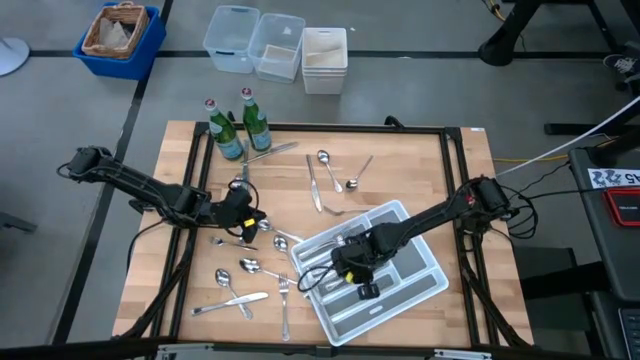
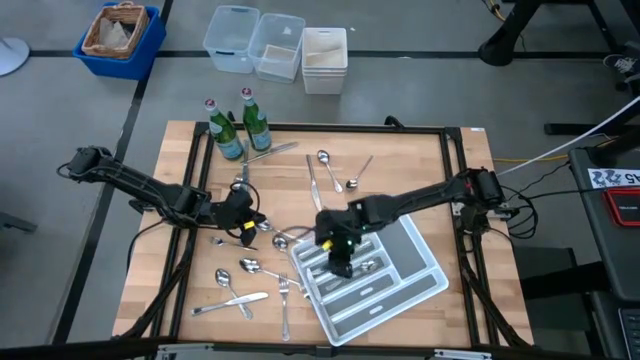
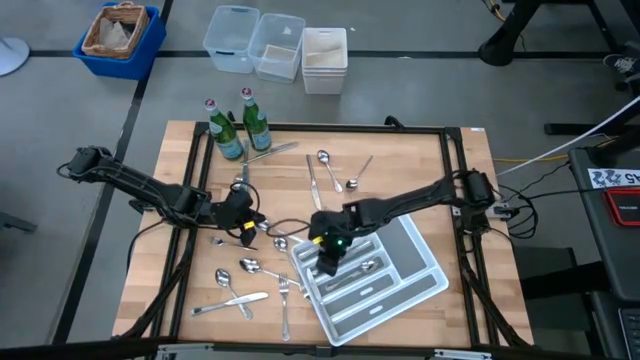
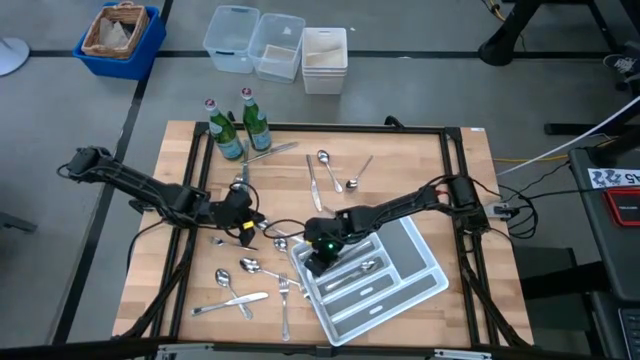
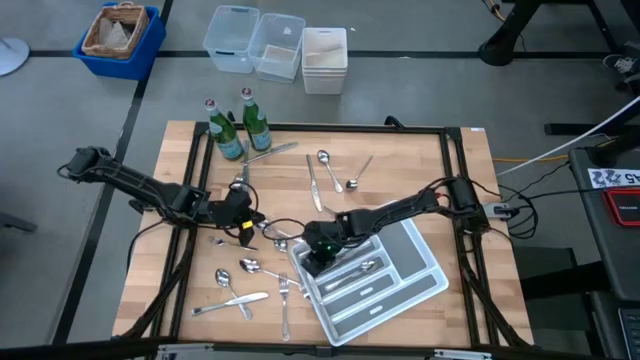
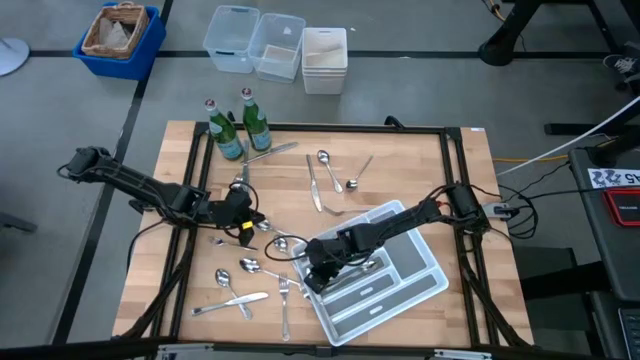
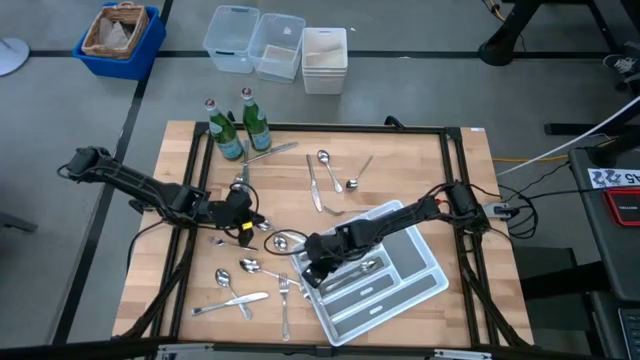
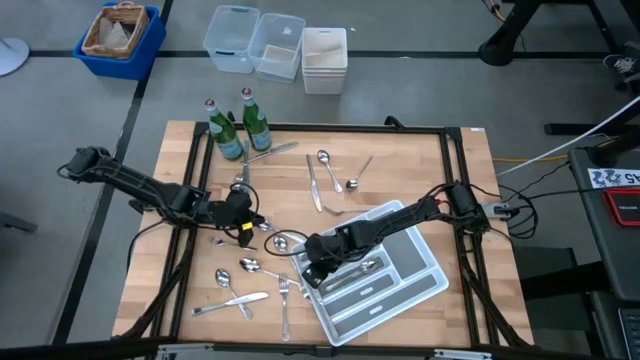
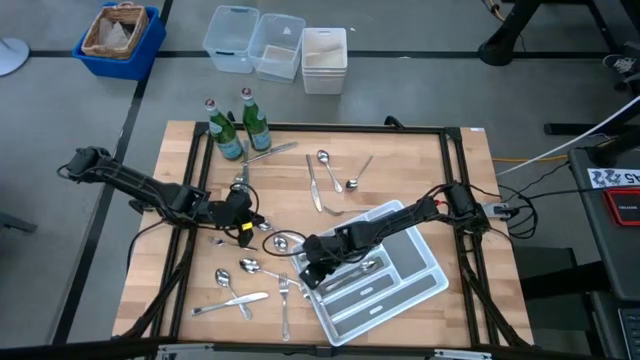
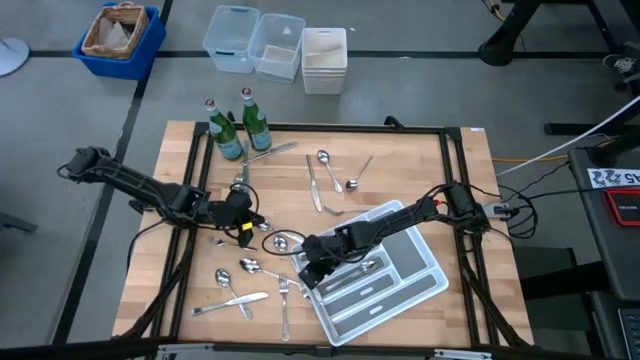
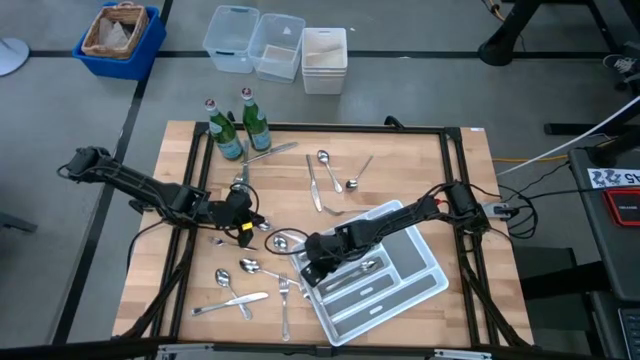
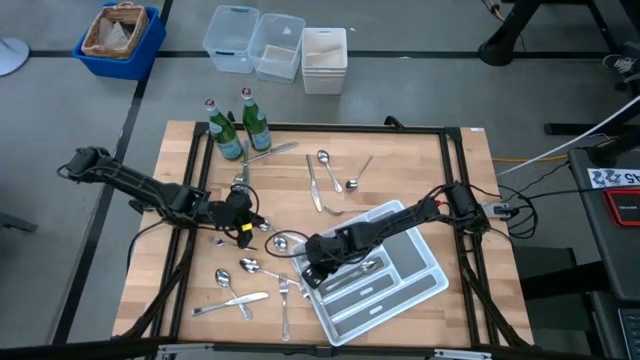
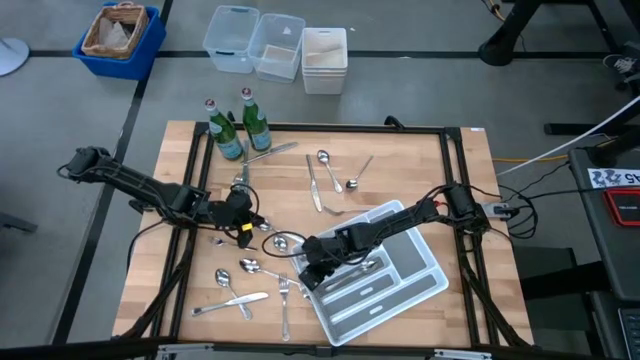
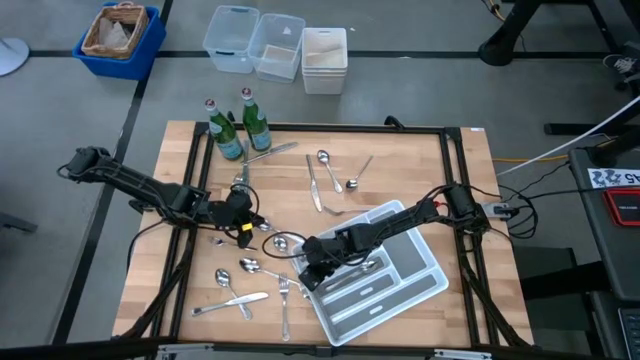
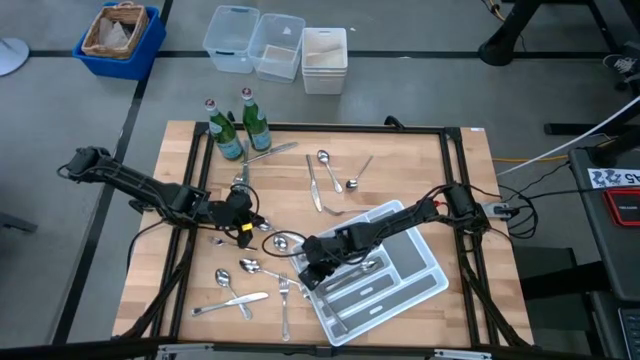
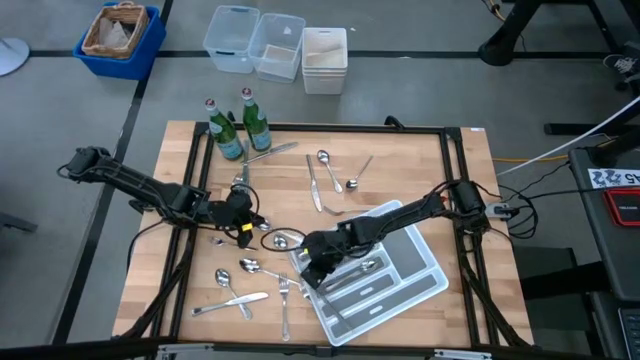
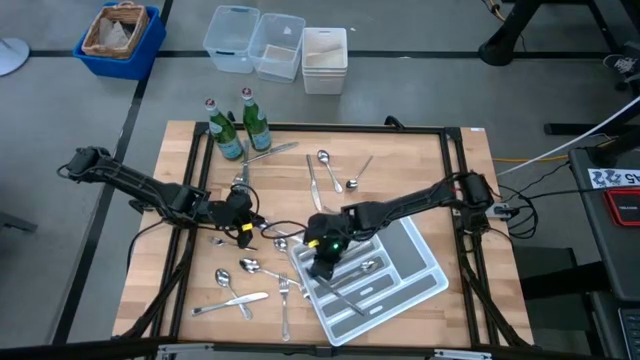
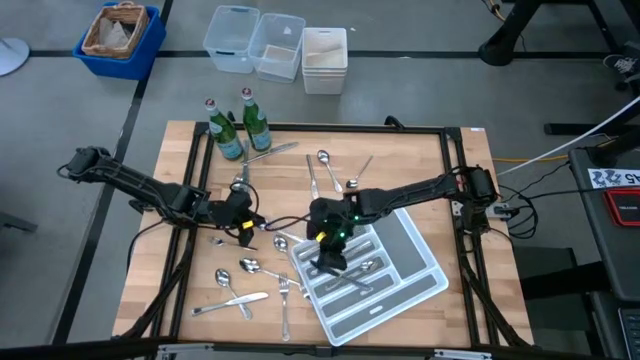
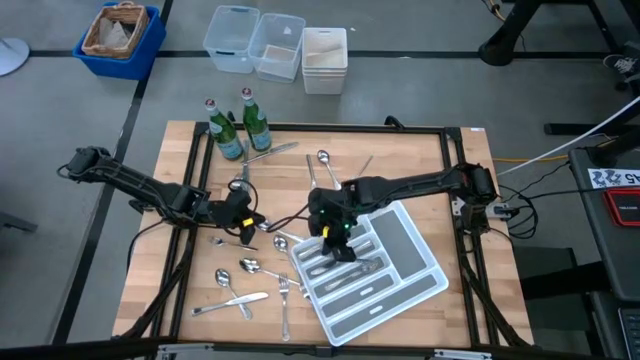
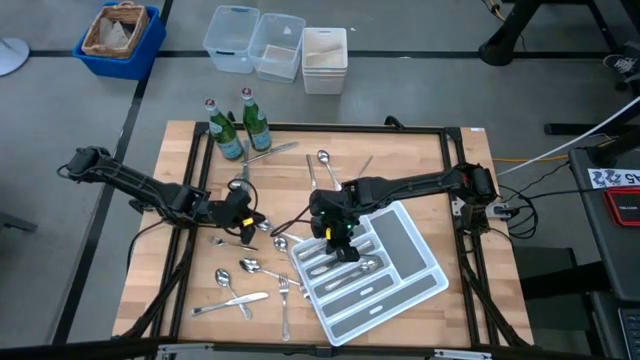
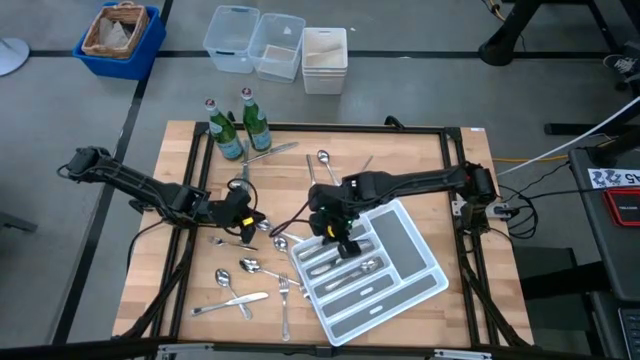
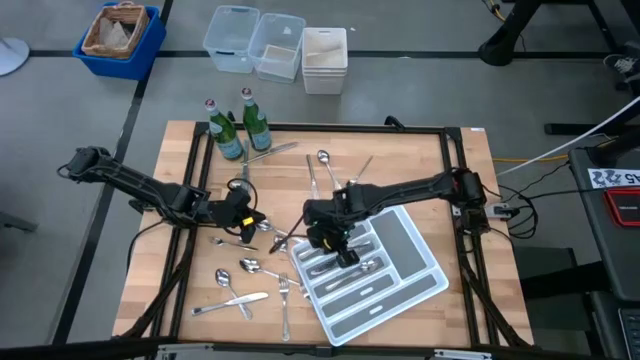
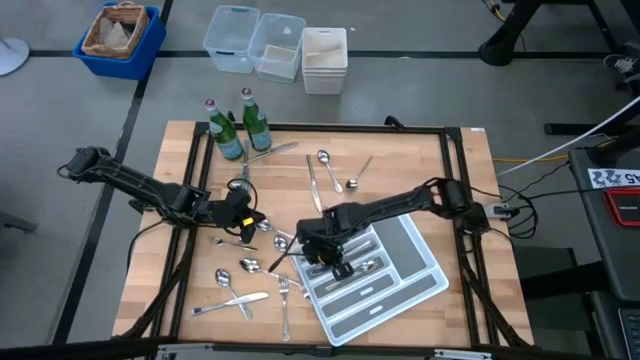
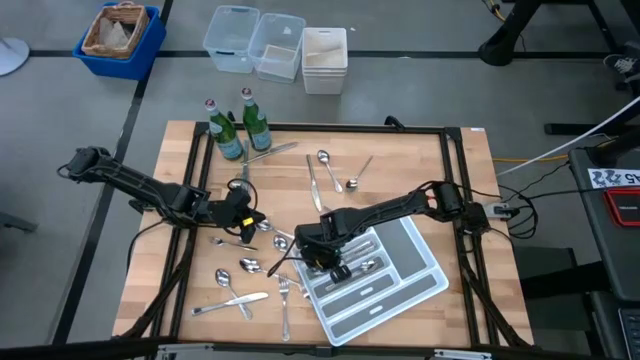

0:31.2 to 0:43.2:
Task: Sort silverware
Put the silver table knife into the white silverware tray

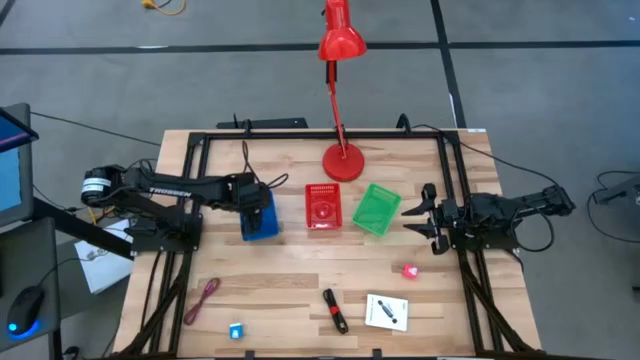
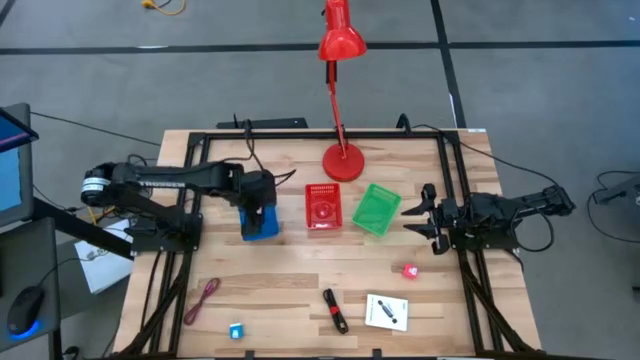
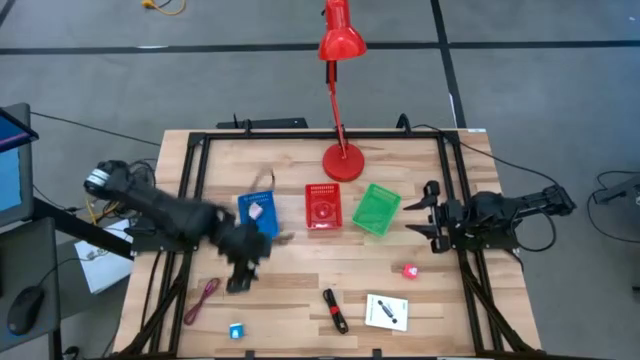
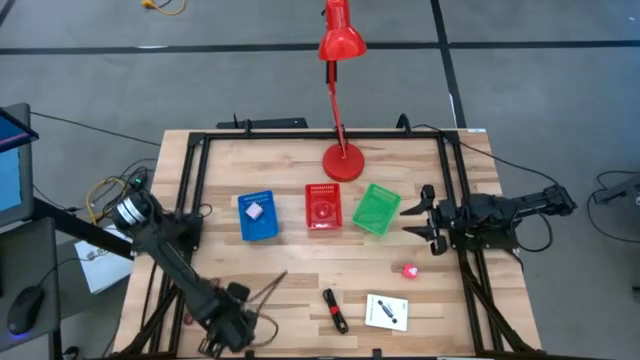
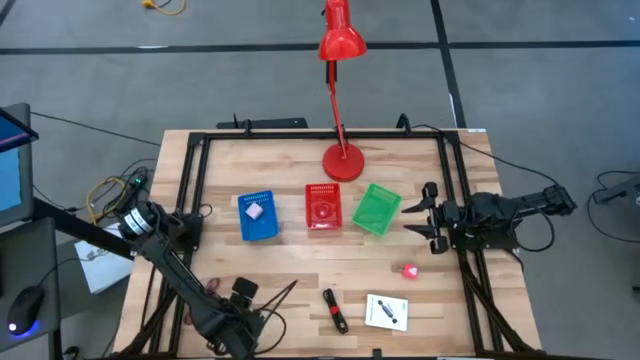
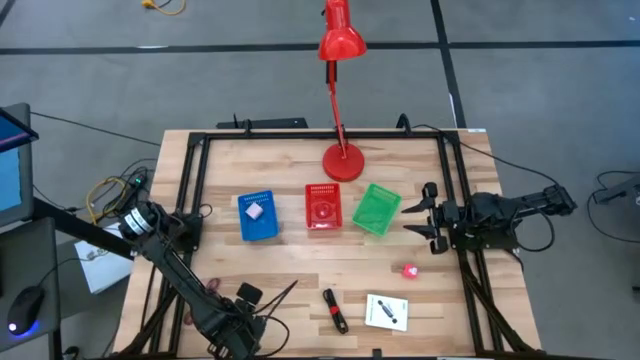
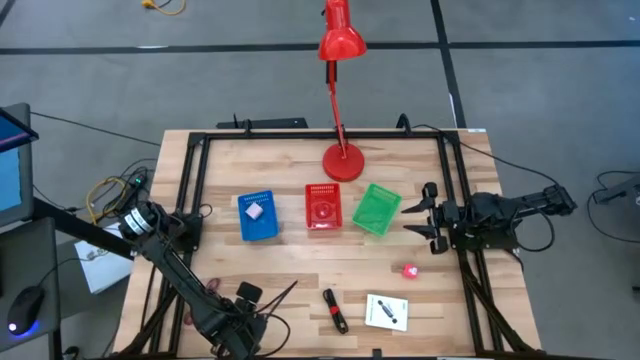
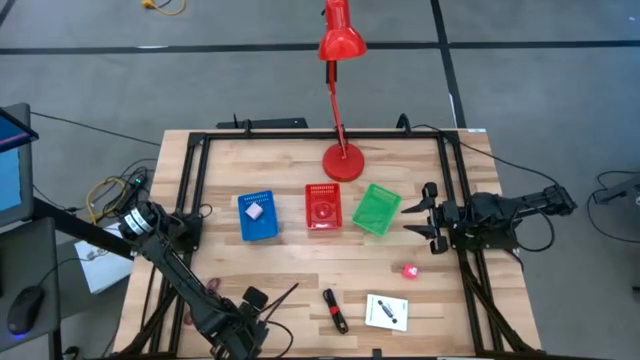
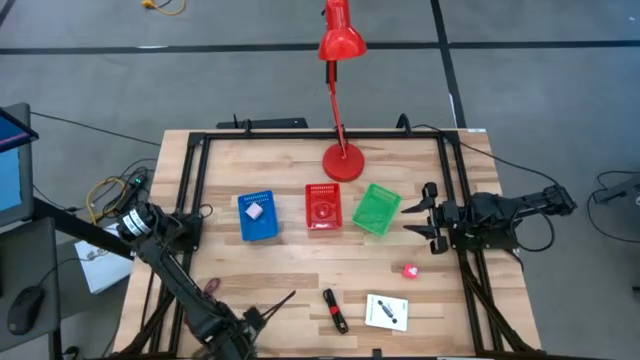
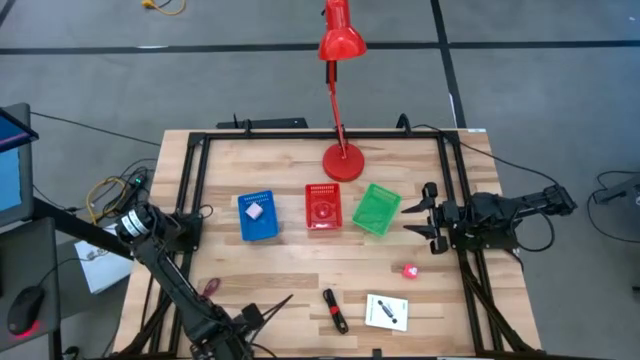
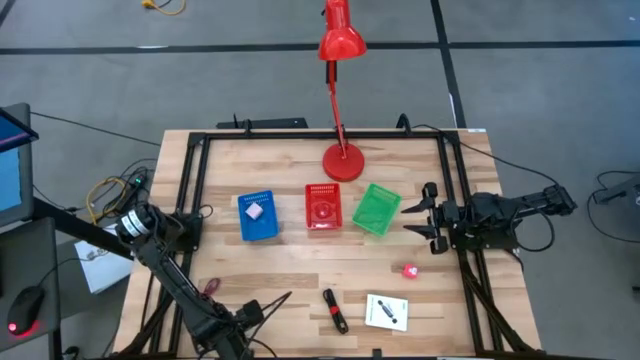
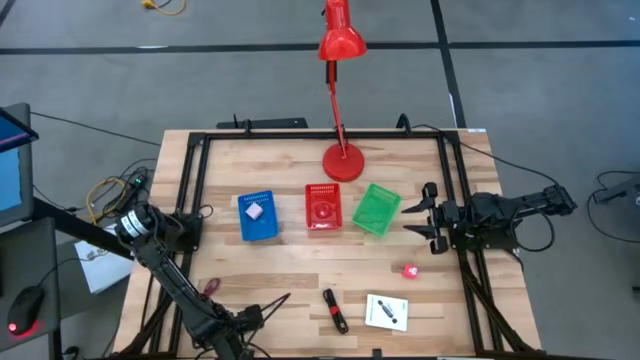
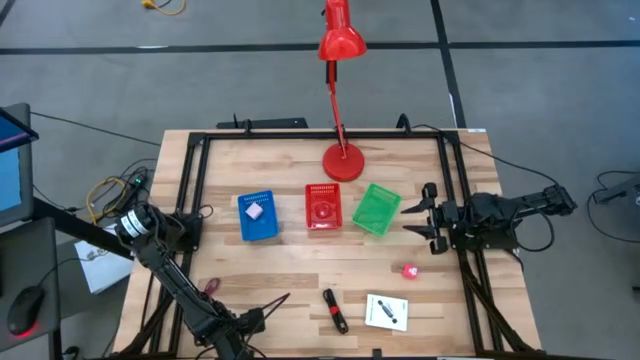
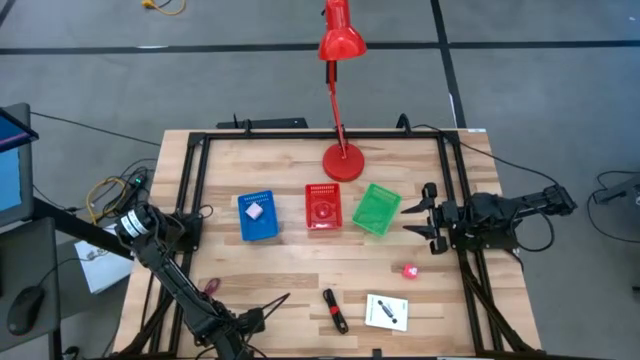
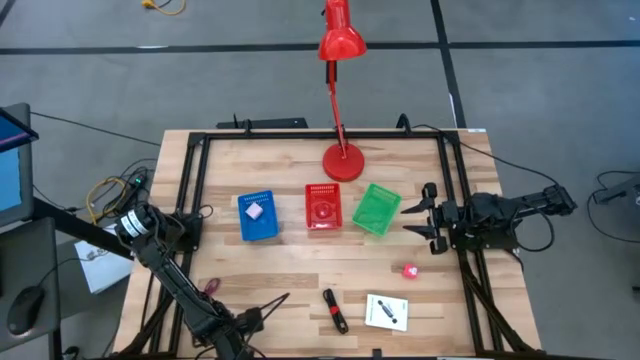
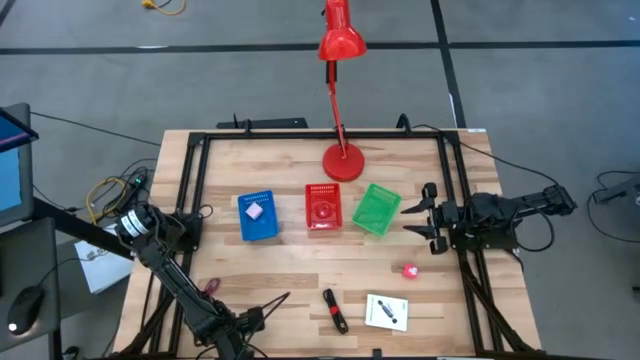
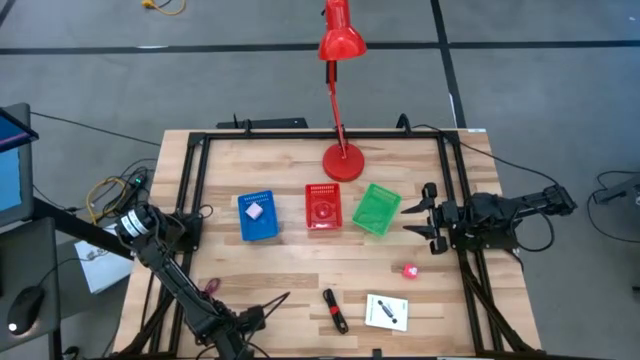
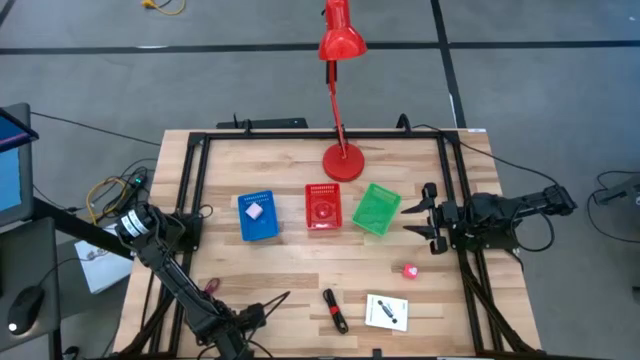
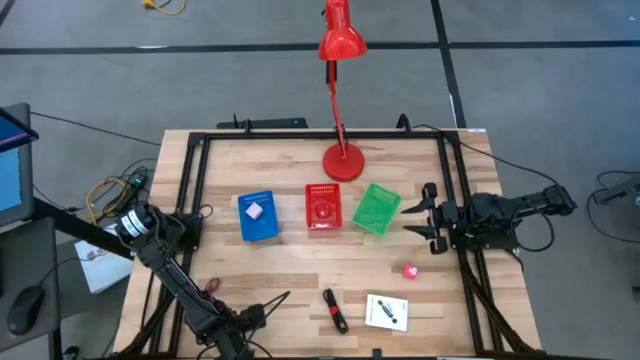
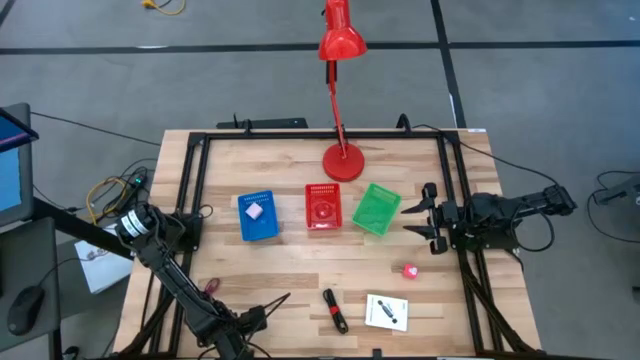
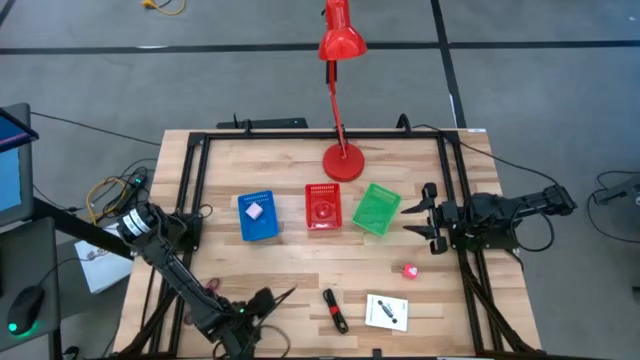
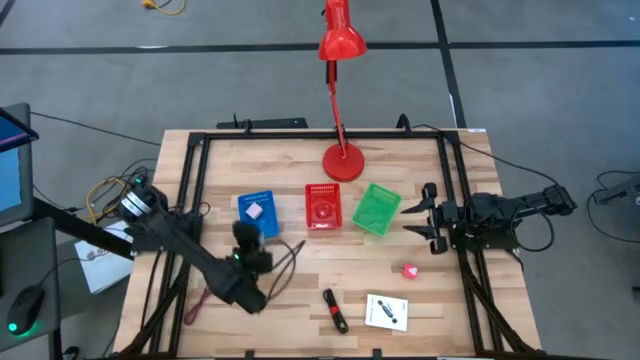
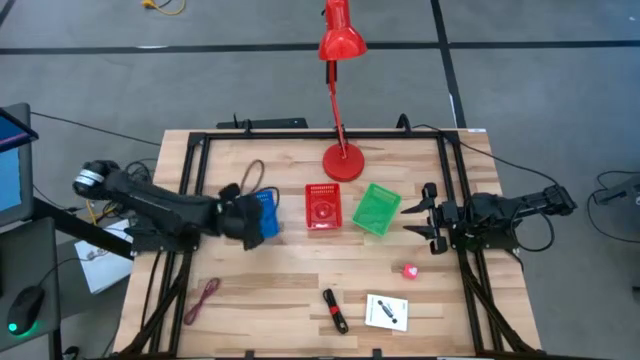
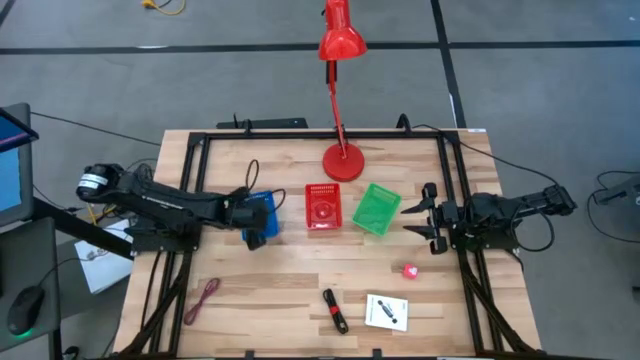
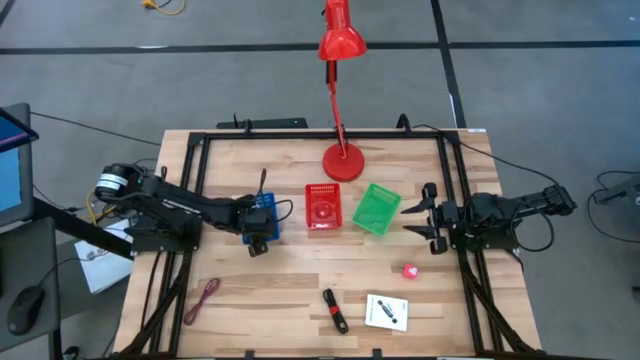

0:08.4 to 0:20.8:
Task: Pick and place items into bin
Put the blue charger adapter into the blue bin
